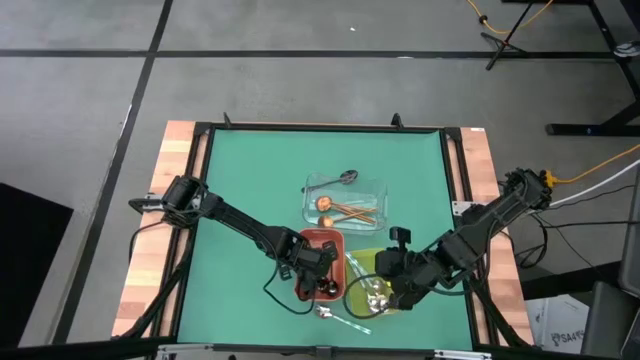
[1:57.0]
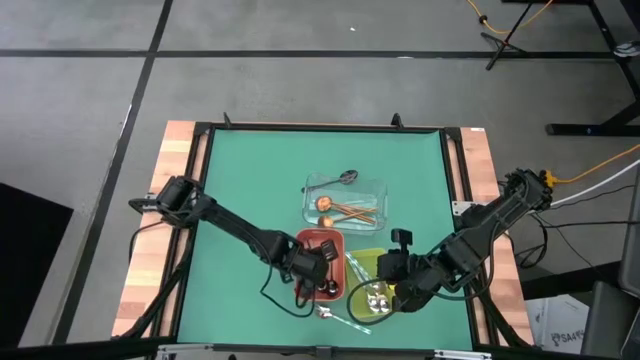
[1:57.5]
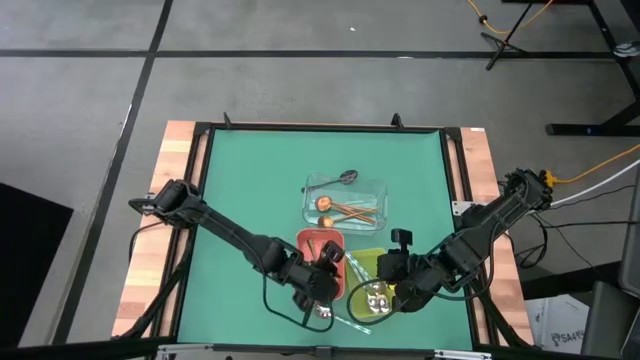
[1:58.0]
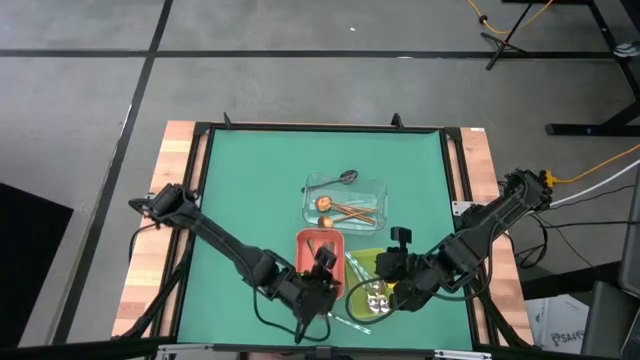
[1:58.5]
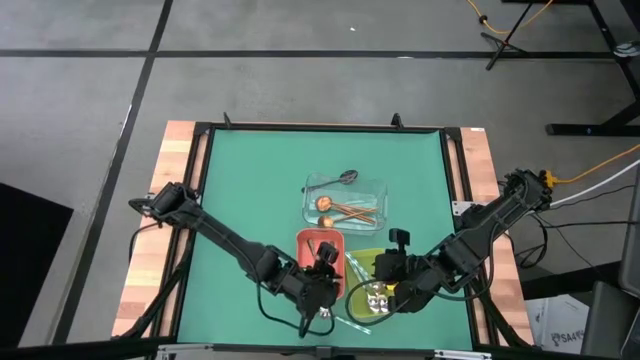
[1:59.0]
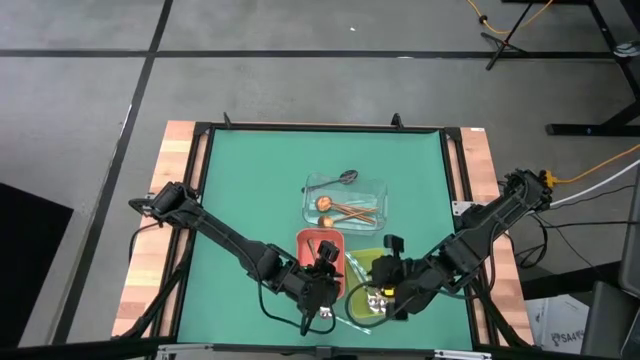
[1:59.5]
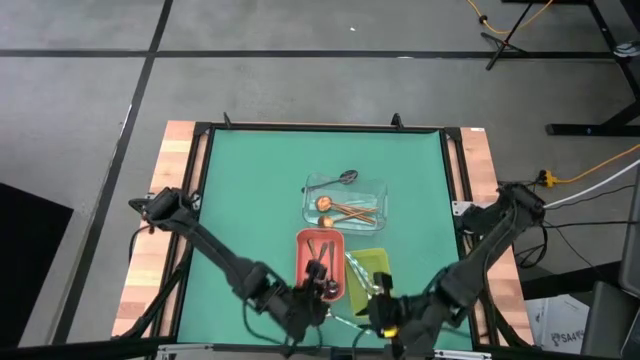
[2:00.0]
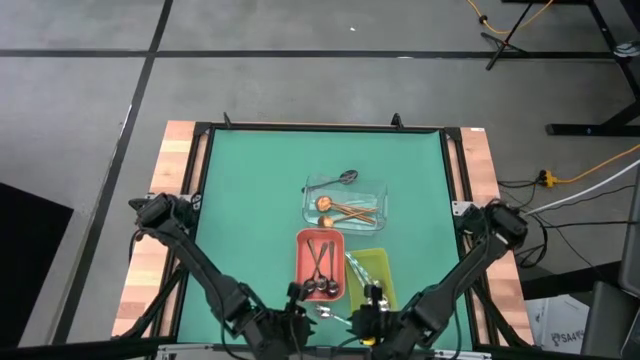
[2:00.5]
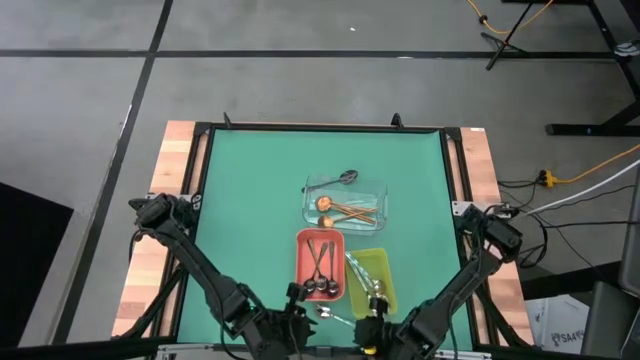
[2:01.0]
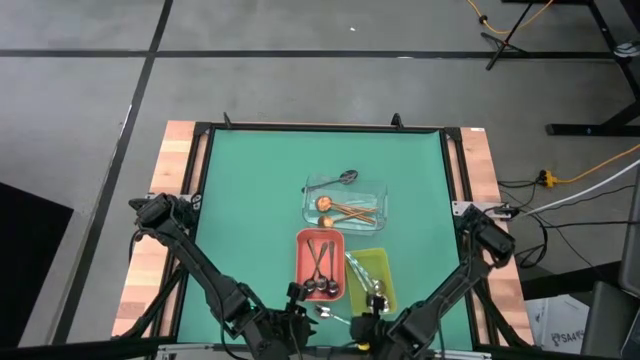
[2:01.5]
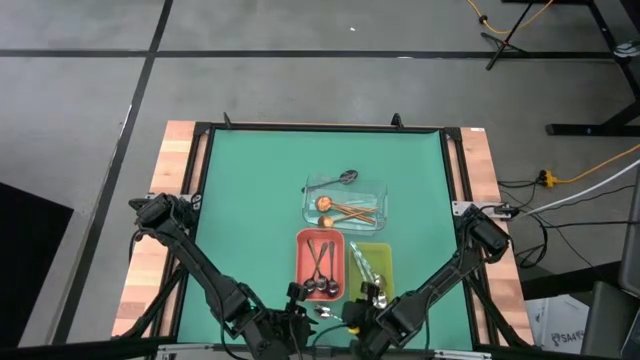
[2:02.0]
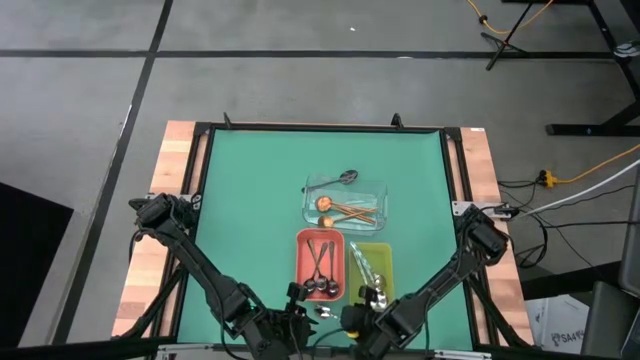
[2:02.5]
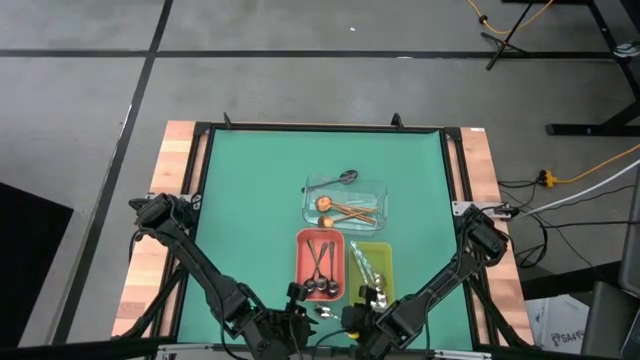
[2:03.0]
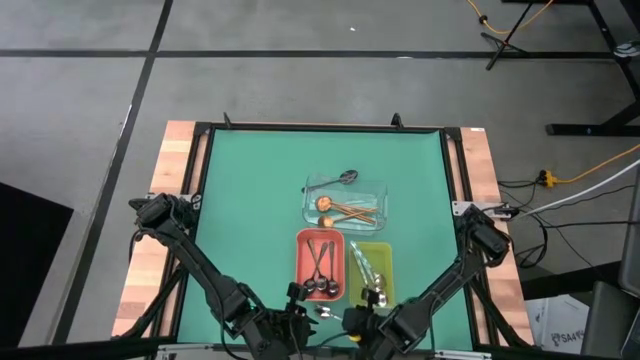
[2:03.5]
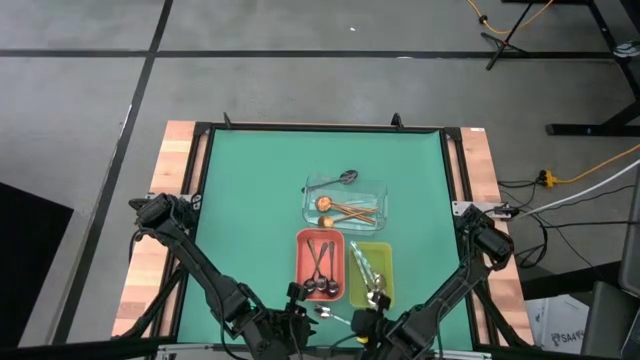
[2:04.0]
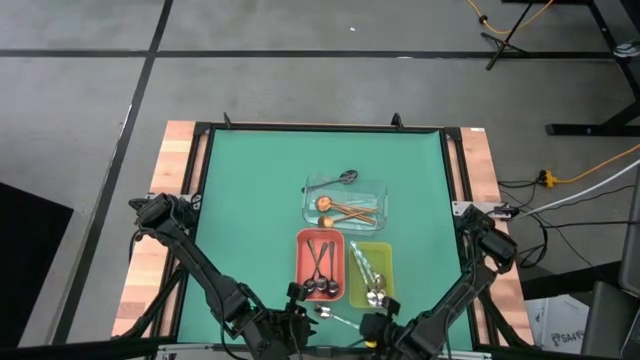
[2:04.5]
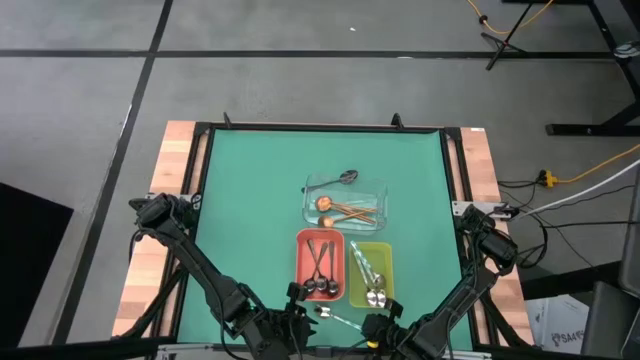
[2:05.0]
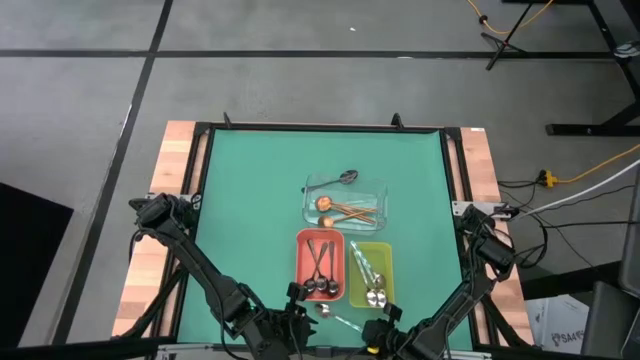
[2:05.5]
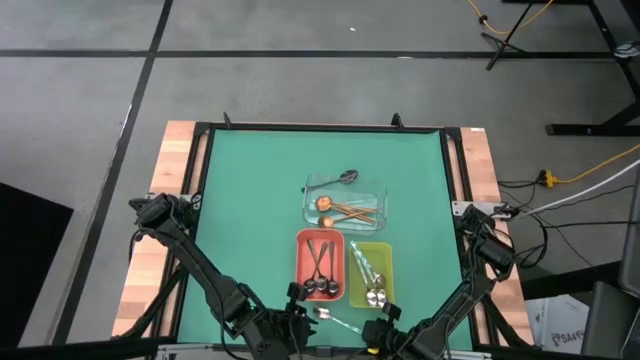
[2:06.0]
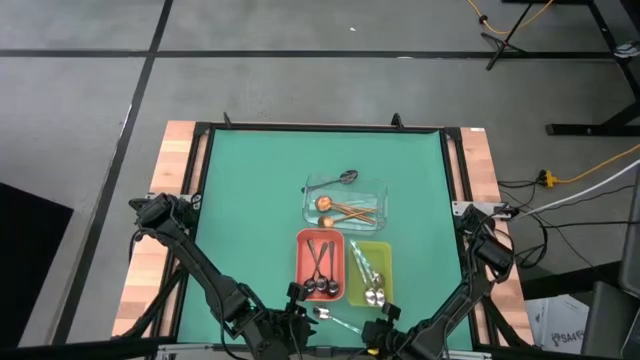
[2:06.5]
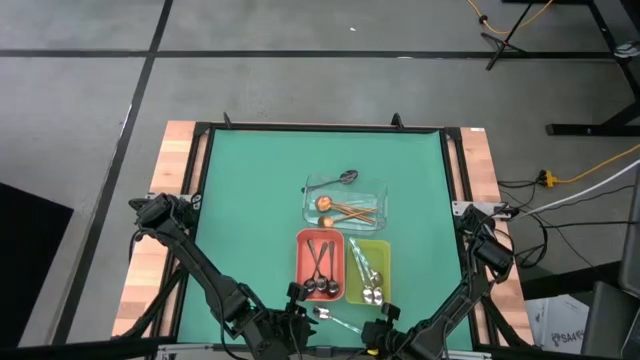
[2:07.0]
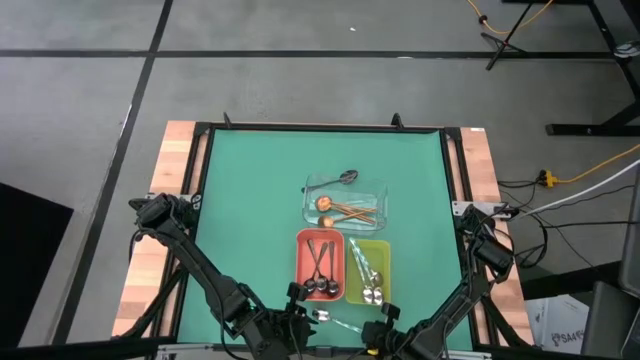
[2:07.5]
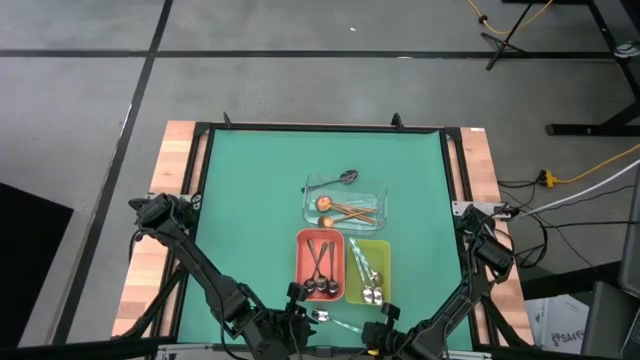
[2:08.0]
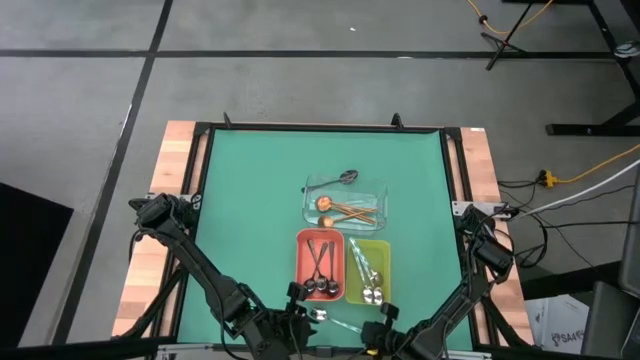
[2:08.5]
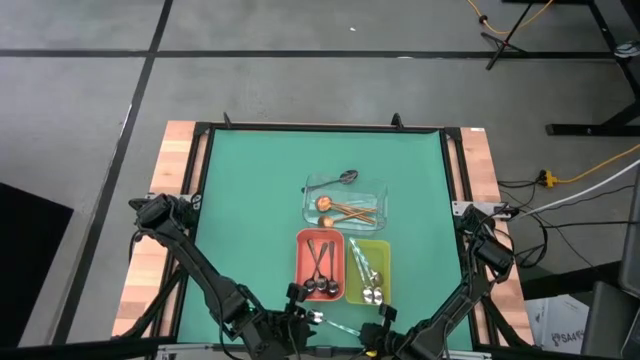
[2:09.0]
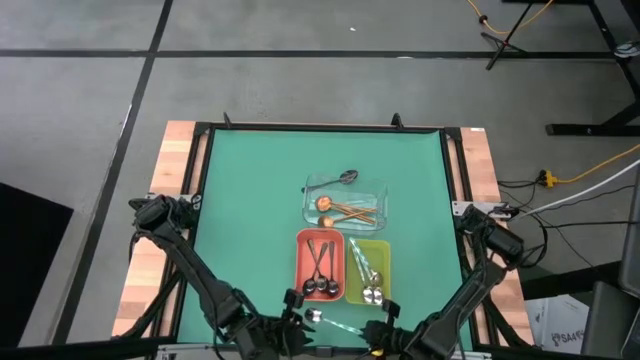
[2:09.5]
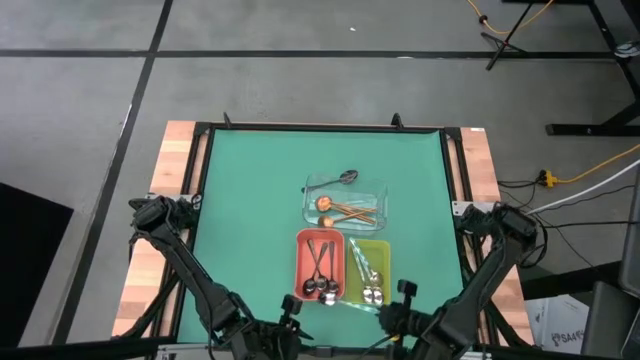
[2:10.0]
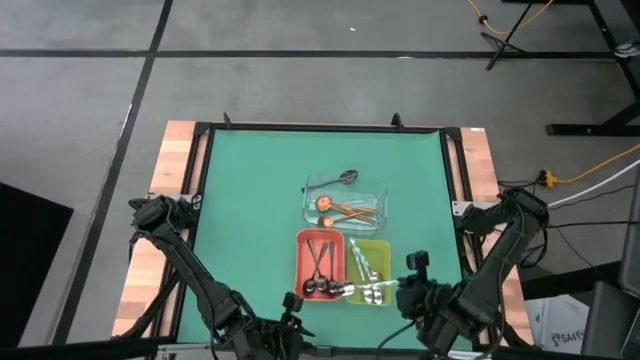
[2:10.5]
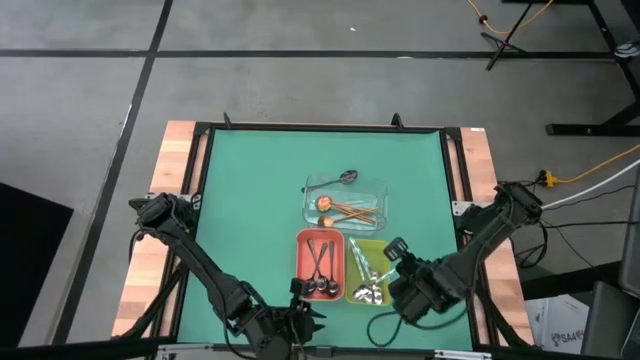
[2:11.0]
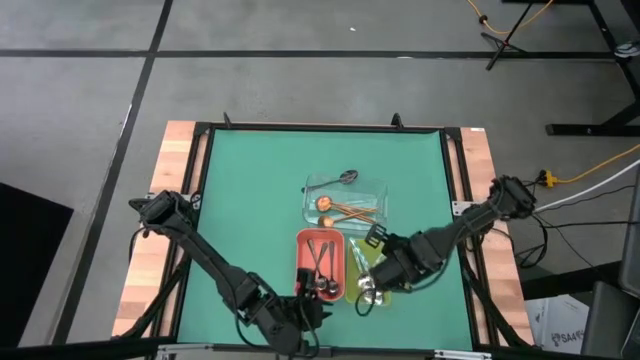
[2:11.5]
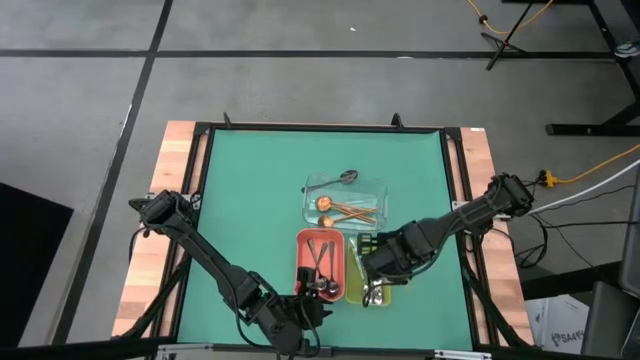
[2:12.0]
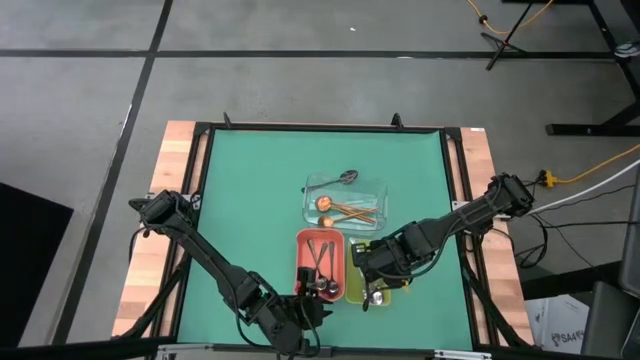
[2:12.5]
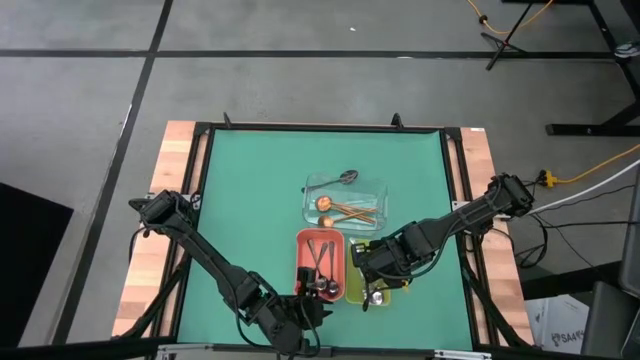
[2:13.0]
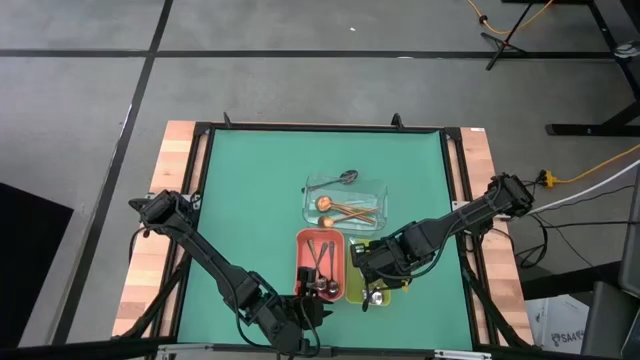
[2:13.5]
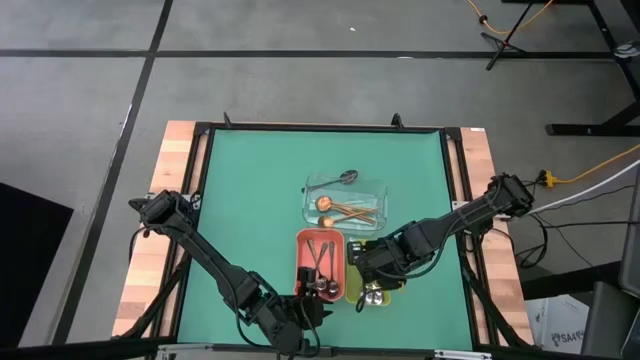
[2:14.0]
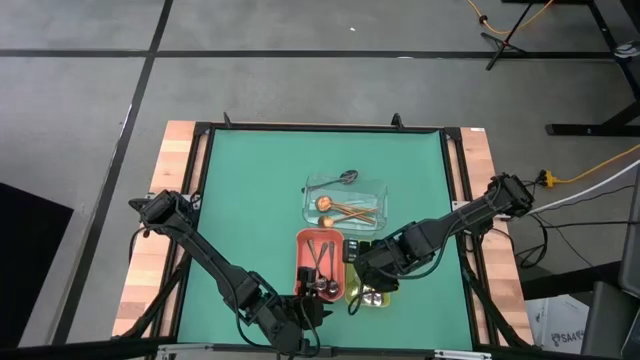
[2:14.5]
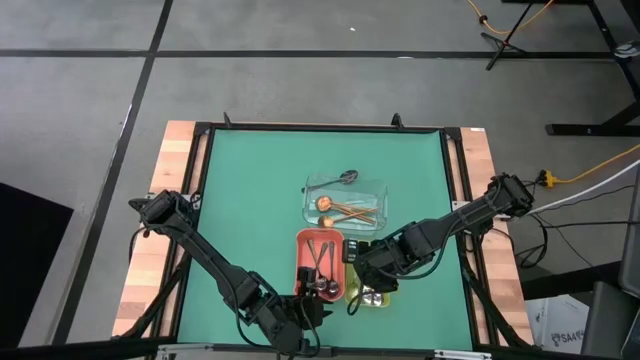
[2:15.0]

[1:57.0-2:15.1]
Task: Sort silverware by color (type)
Put the blue patterned spoon into the yellow bin

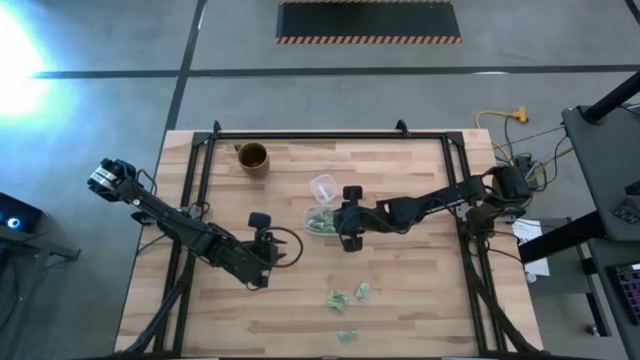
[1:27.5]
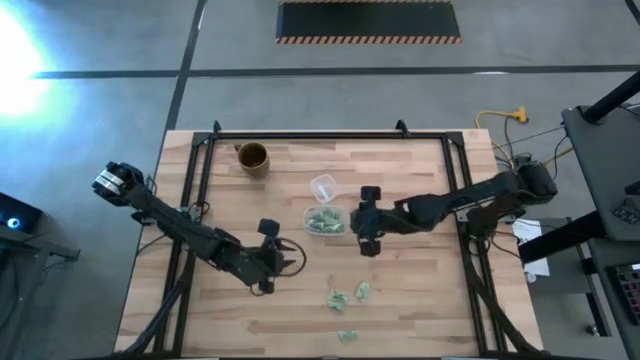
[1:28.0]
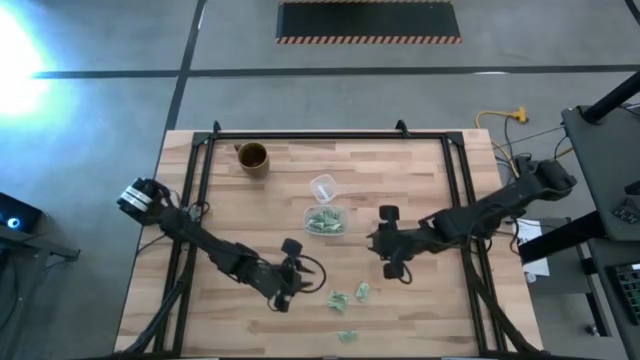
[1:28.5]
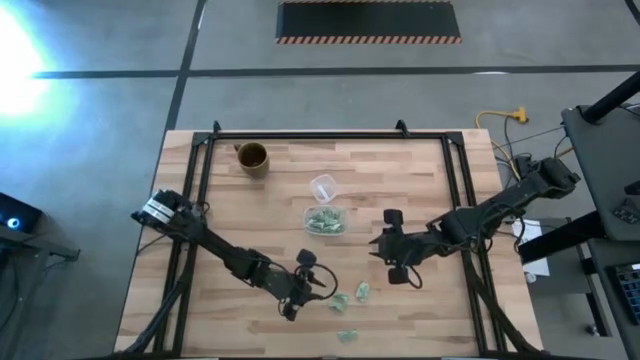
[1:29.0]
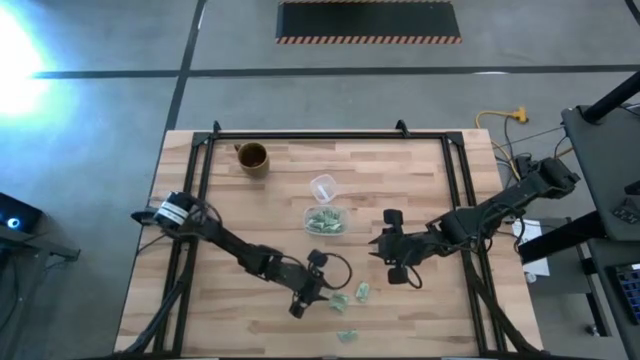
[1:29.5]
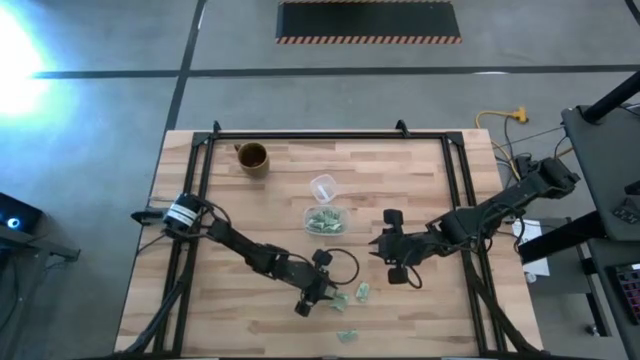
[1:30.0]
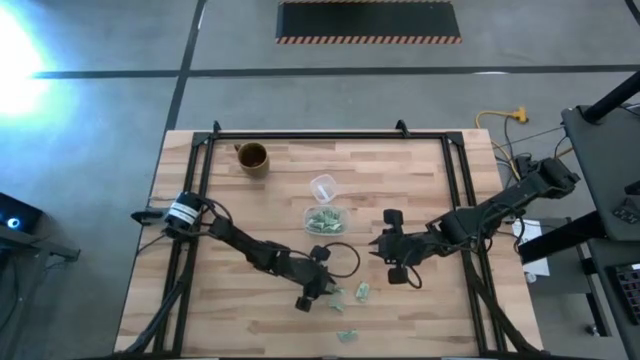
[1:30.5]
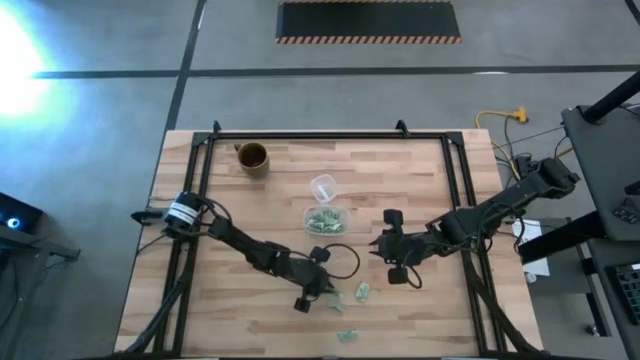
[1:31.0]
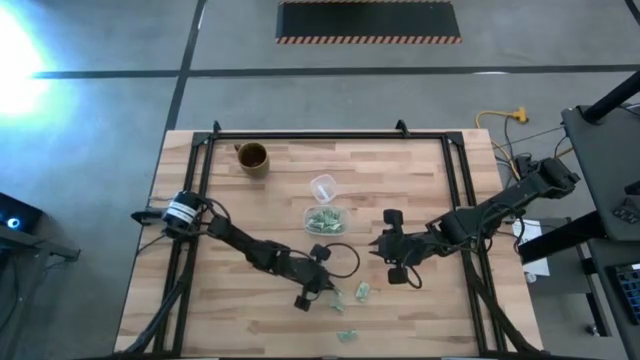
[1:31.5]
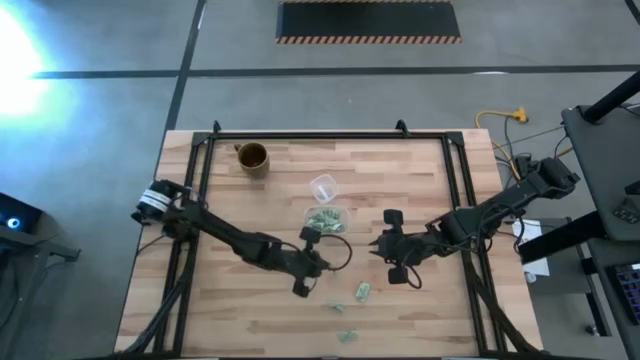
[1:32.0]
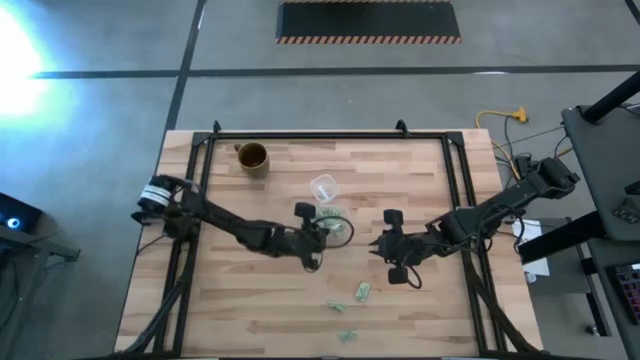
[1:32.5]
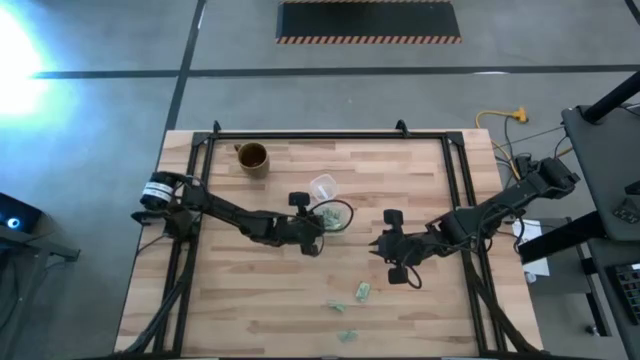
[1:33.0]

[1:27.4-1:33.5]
Task: Pick and place Stevia / Truvia into bins
Put the stevia packet into the bottom transparent container
